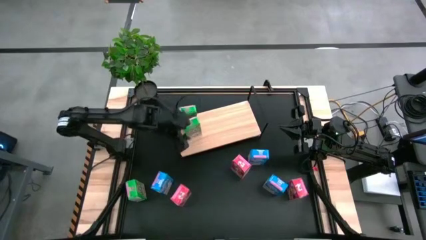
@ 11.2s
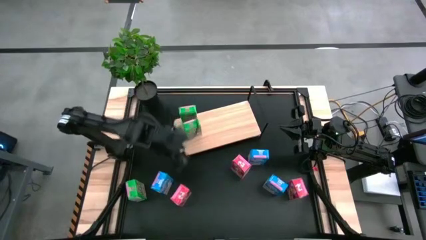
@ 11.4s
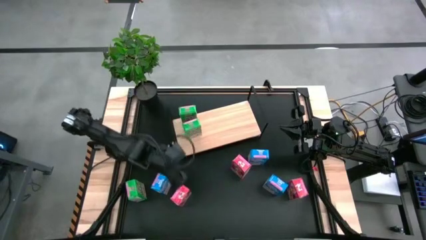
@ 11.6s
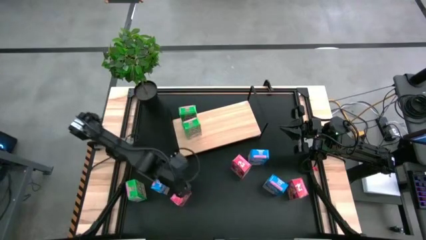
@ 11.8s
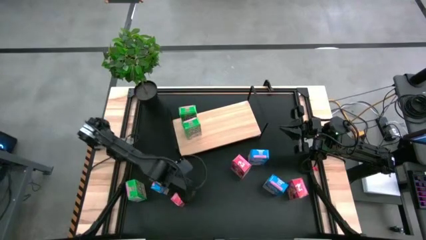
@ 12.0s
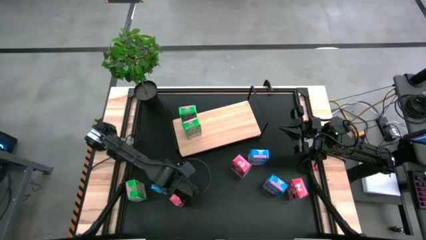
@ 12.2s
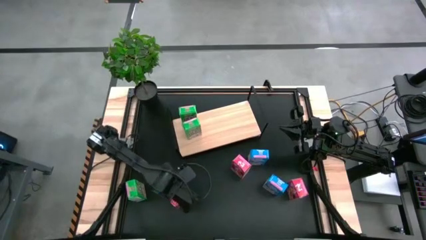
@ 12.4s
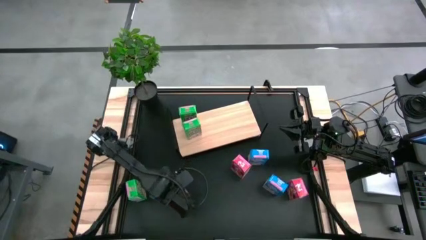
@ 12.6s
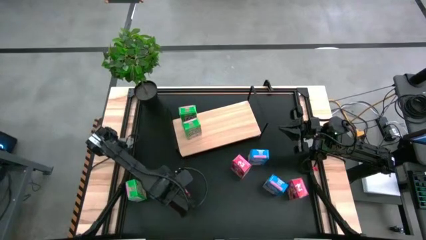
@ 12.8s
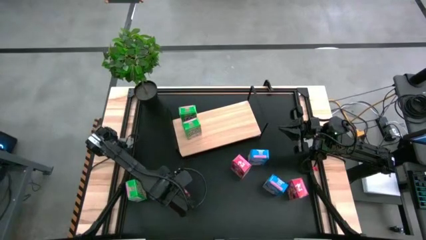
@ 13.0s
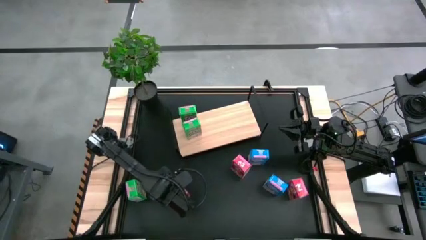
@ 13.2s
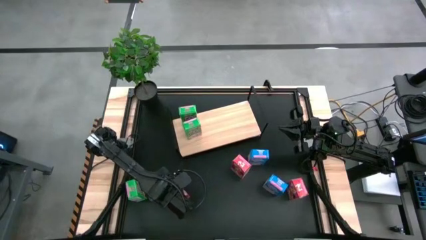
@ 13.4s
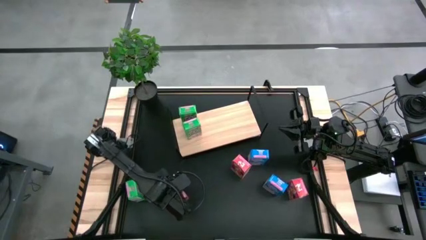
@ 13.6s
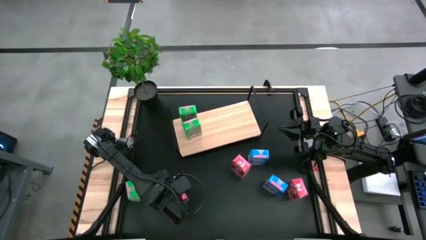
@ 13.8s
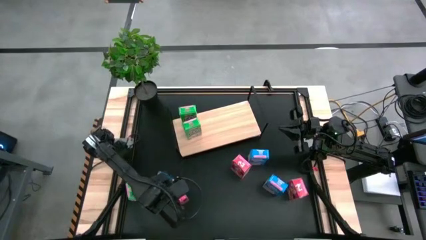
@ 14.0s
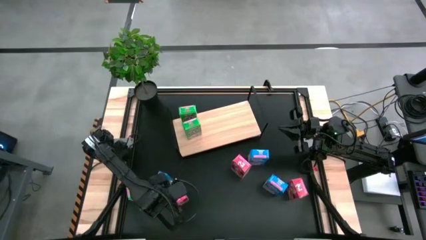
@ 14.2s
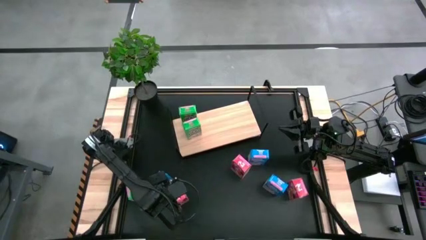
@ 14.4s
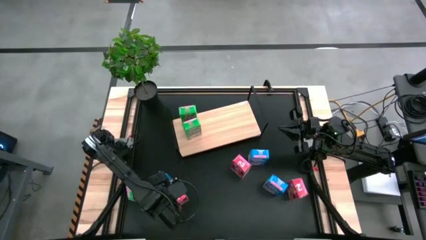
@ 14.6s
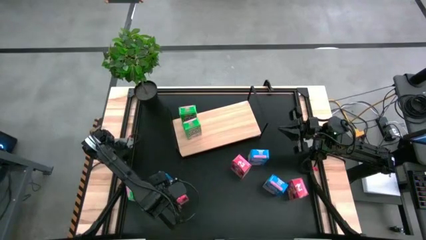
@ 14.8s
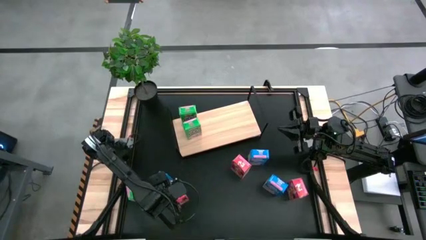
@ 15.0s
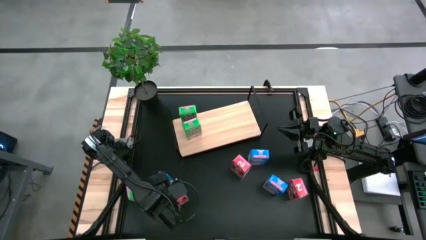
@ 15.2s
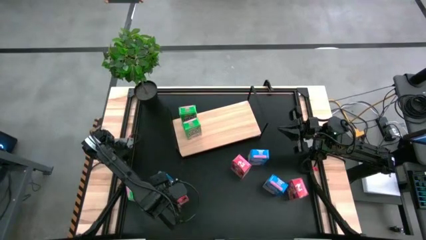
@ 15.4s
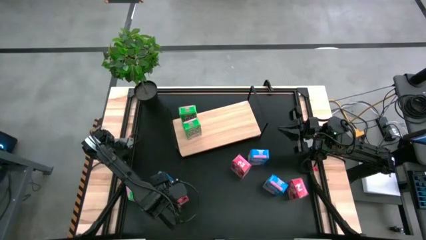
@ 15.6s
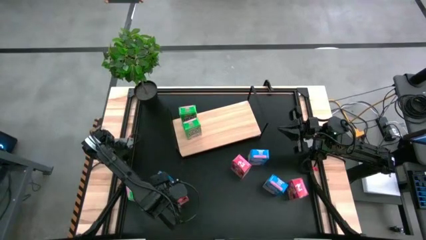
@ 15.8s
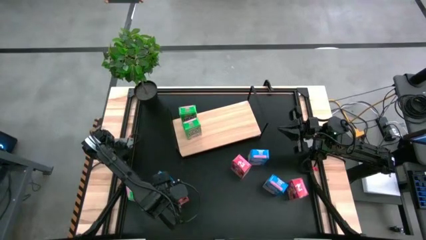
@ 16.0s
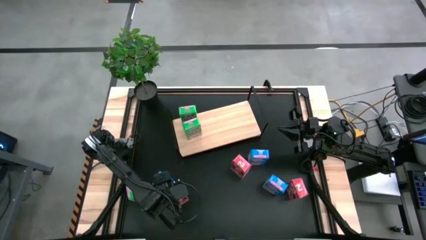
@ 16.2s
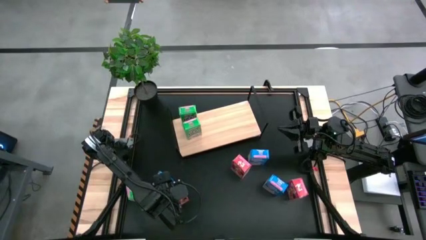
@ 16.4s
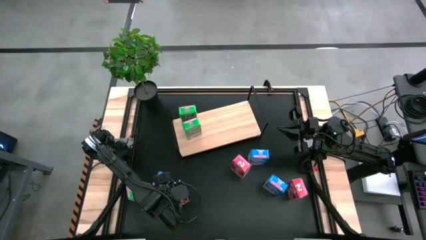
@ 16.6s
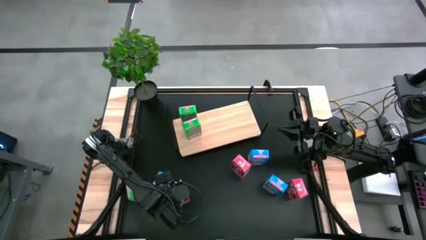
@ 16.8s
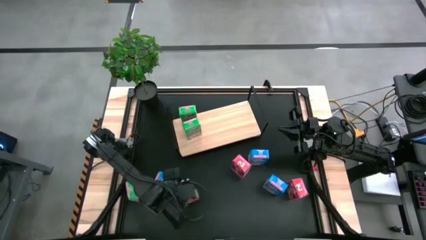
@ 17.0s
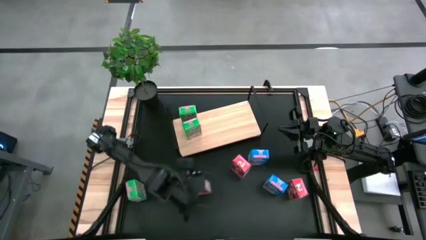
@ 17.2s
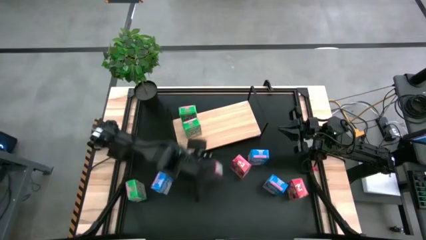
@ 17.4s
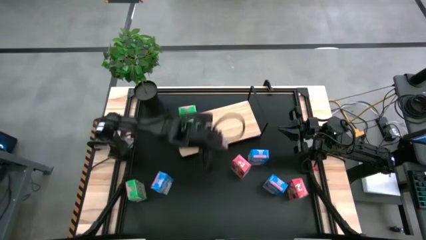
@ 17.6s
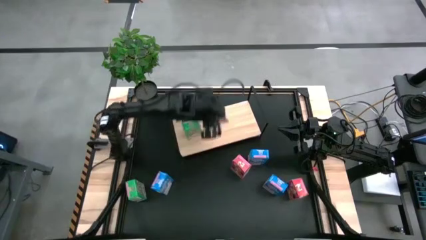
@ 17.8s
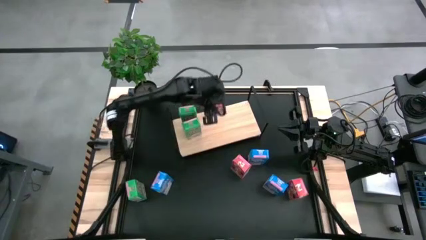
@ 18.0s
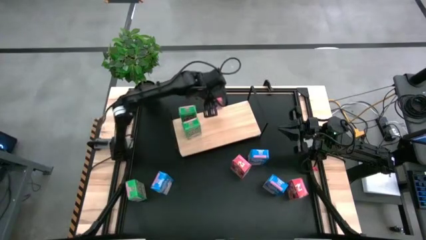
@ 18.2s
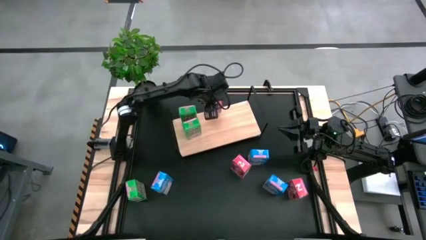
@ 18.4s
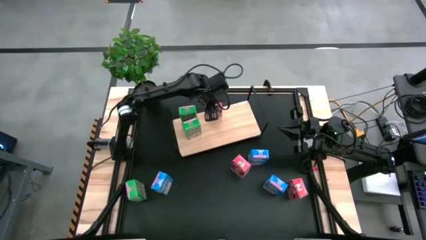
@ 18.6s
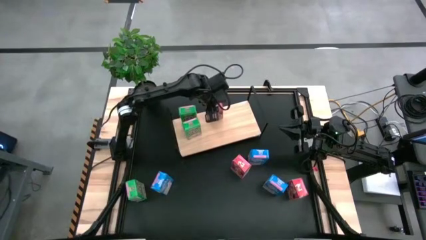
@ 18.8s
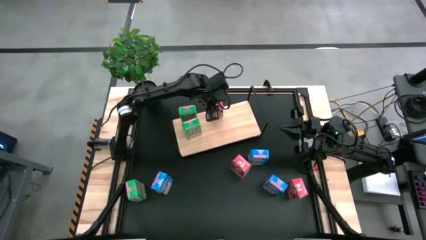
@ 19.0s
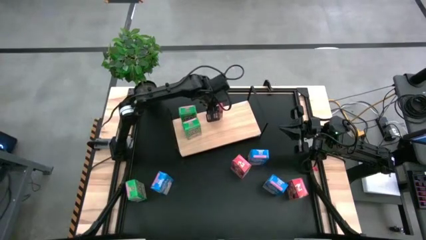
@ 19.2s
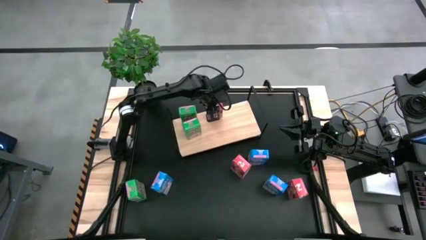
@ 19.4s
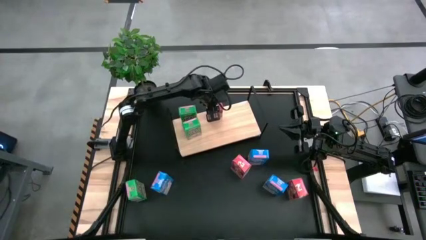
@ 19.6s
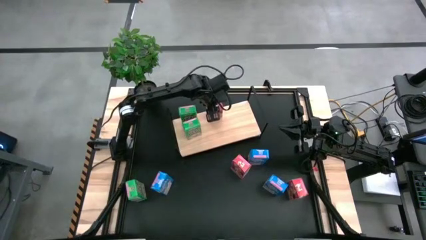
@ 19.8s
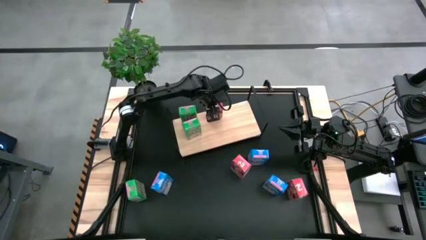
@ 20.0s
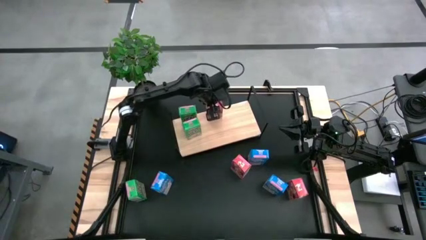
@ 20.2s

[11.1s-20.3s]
Task: Stack cereal on shelf
Put the left red cereal box on the shelf

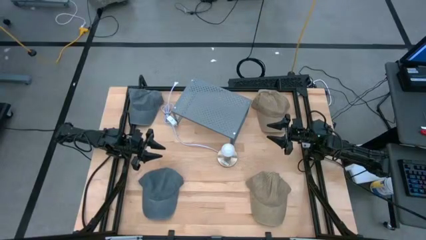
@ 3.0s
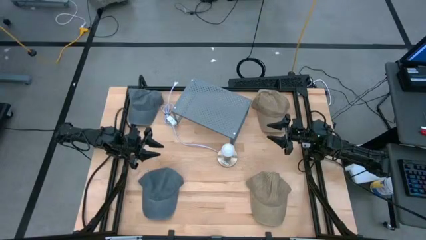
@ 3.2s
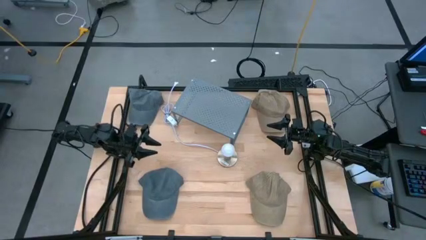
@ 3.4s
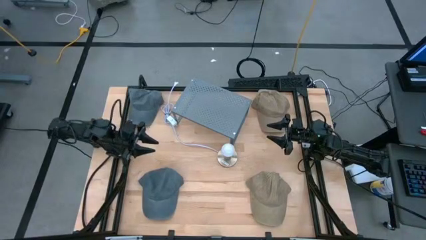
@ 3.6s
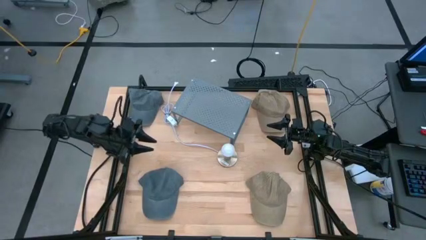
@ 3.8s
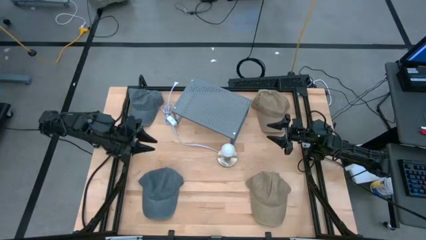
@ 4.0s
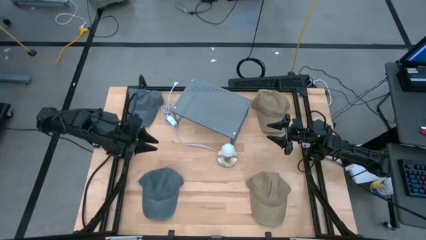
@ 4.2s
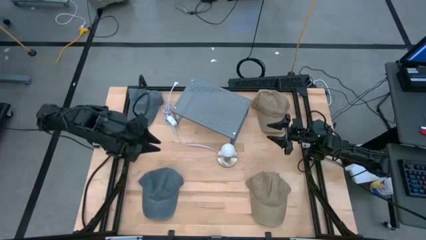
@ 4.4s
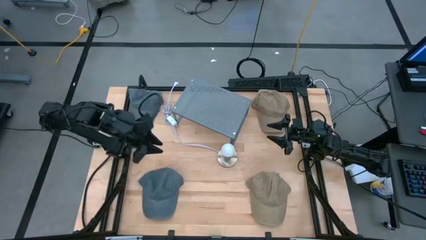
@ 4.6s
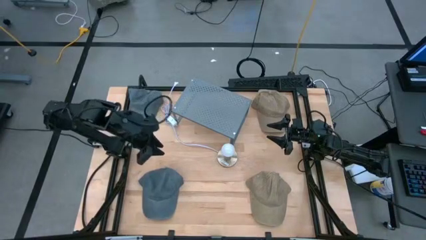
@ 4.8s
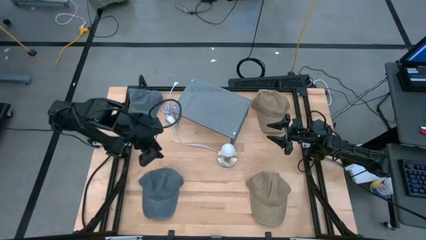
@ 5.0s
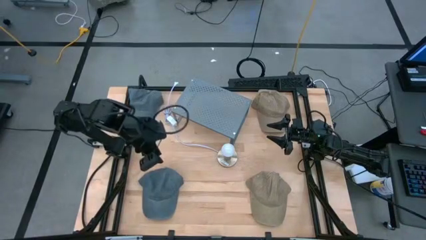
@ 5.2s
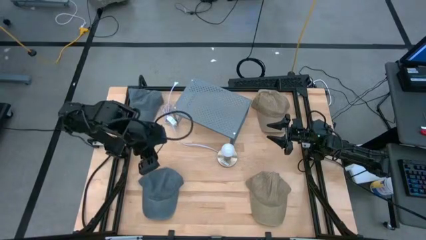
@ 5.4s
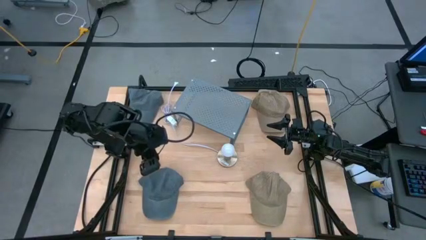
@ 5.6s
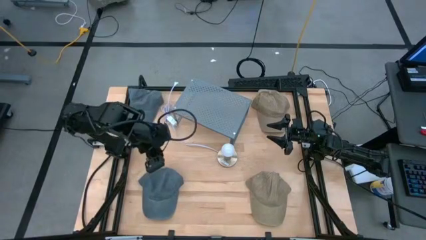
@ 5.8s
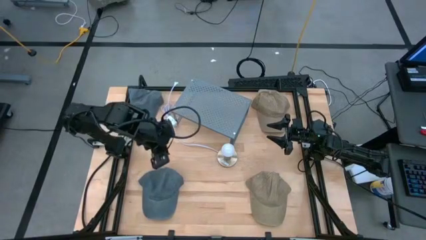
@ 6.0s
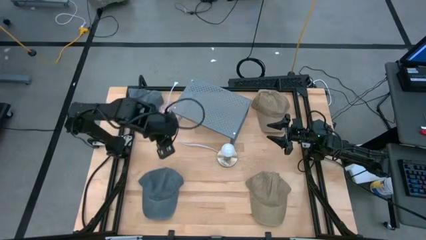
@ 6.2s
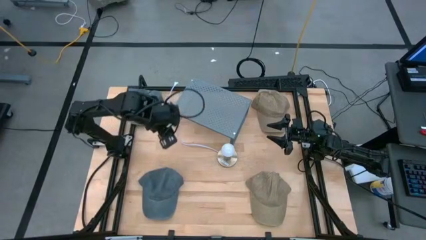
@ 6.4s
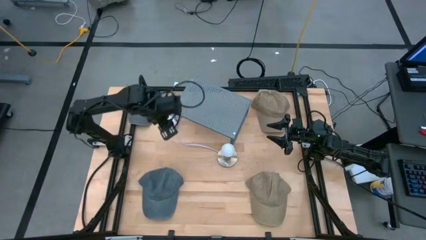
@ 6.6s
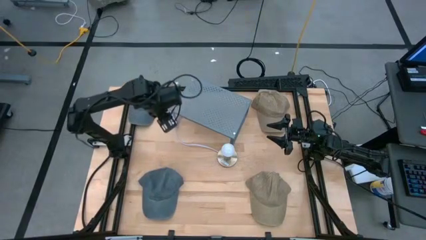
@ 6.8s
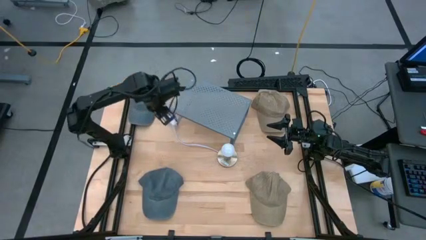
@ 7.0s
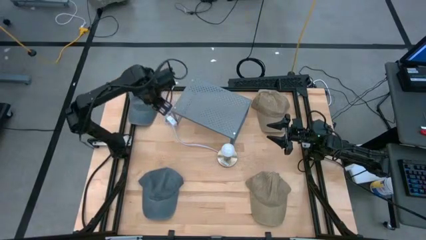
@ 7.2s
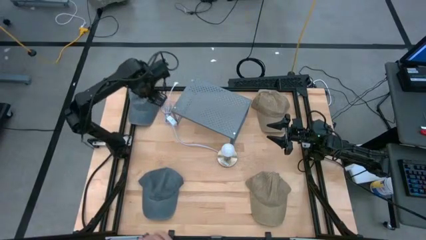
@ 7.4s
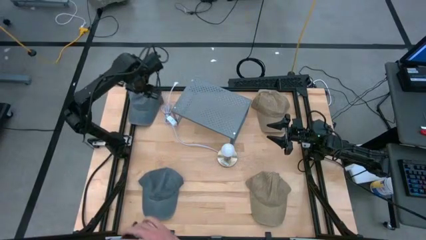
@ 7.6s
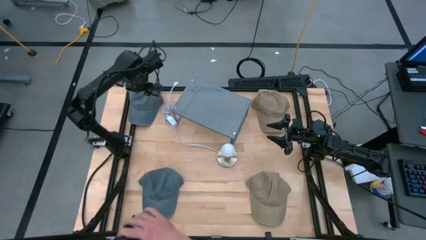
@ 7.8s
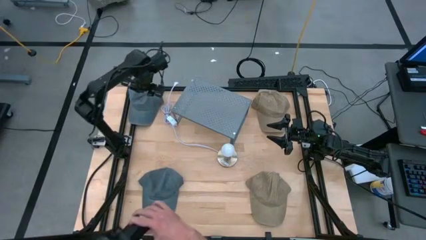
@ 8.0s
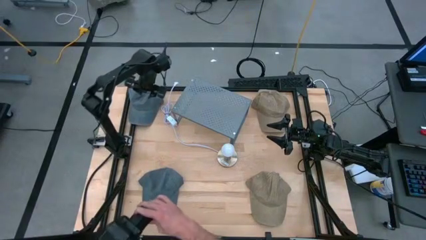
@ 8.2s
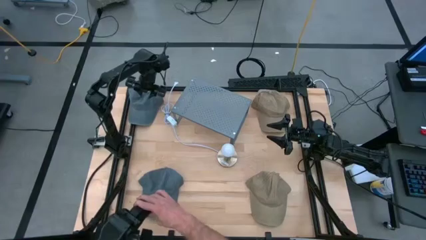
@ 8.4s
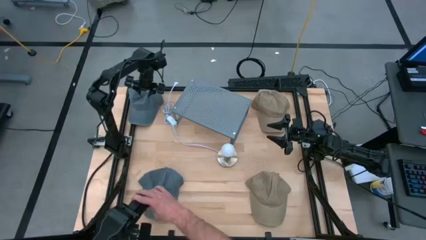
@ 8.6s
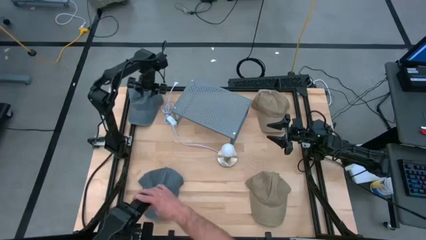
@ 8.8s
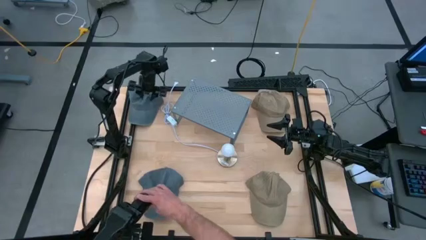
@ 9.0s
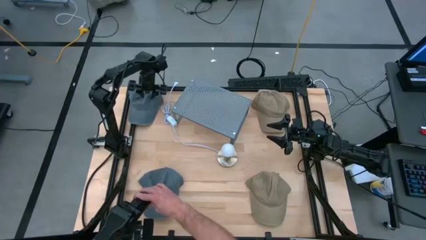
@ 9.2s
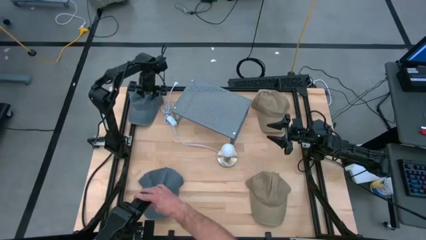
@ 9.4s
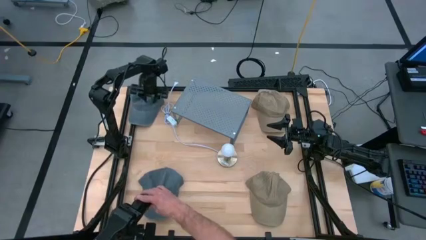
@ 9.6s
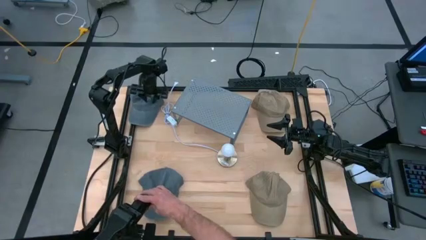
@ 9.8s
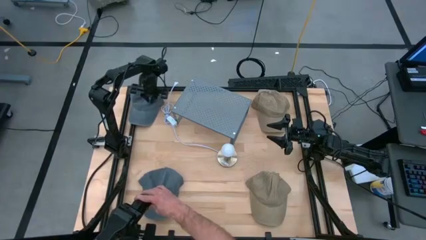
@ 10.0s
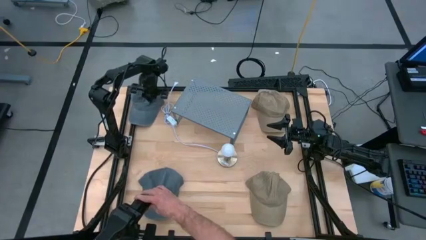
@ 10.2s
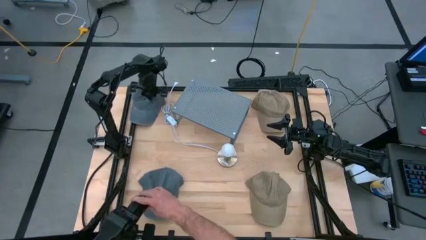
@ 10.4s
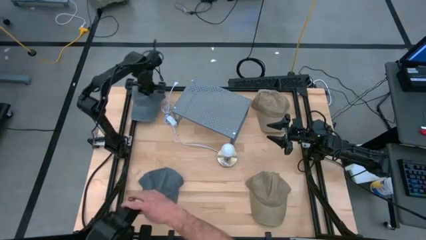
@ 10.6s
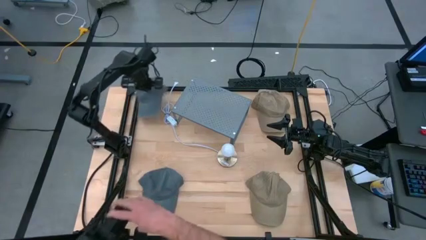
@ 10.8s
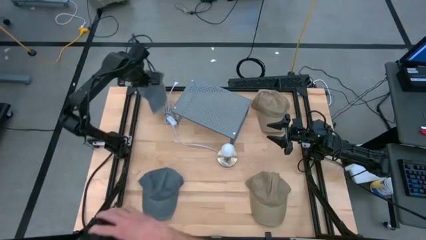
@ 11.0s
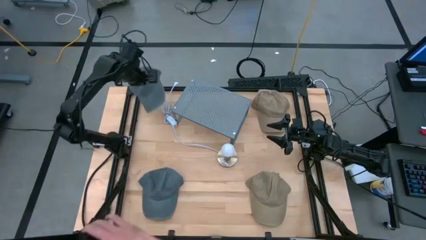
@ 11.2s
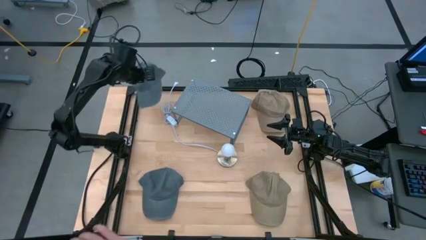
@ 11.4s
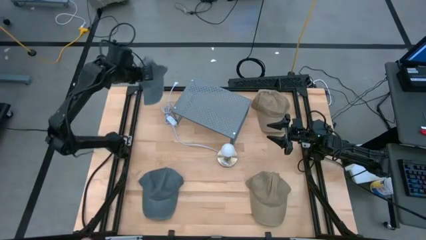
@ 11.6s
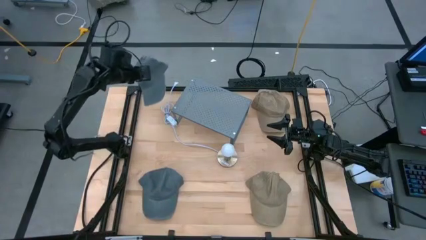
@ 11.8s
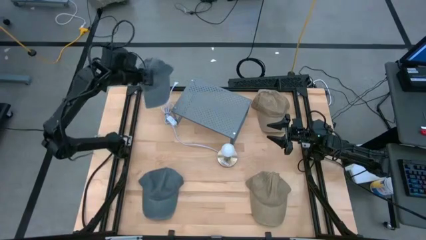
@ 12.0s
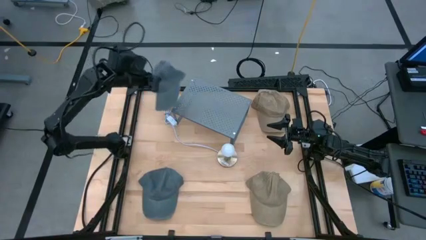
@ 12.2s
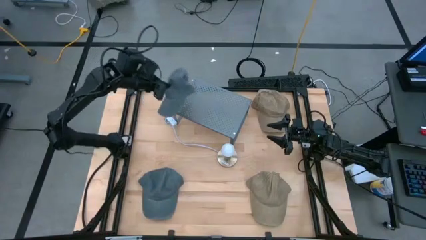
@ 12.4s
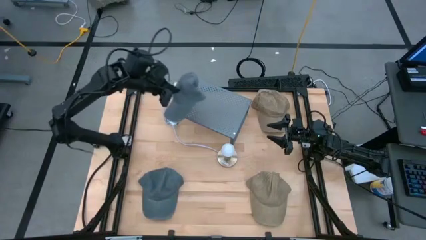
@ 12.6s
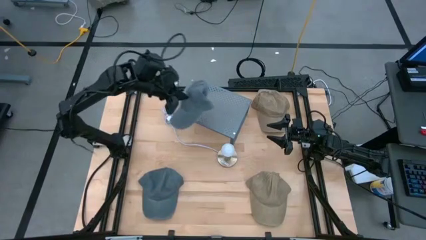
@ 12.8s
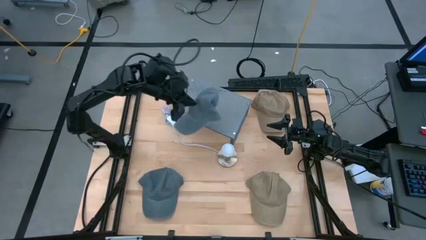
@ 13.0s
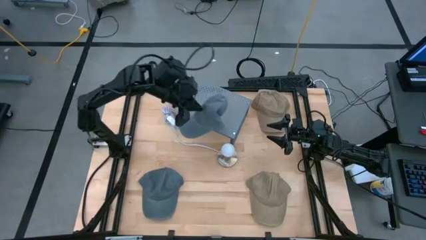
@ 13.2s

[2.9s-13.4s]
Task: Pick & Place hat
Put the top gray cap on the shelf
